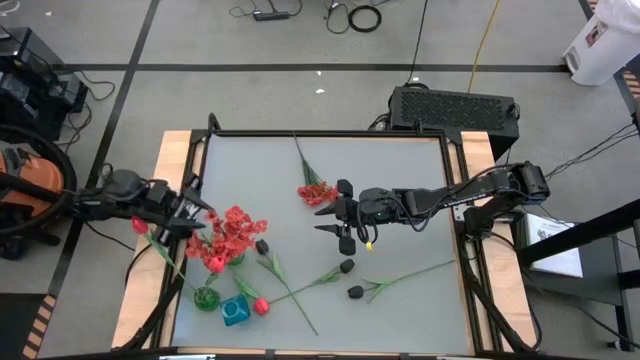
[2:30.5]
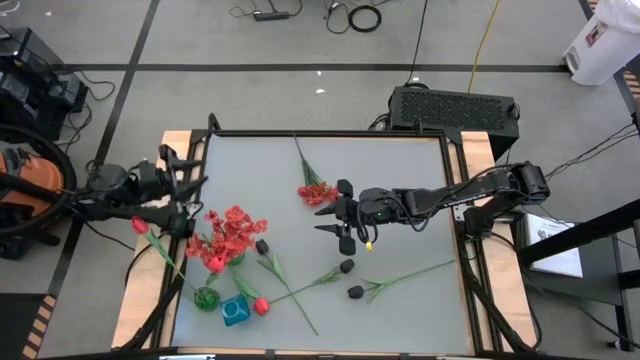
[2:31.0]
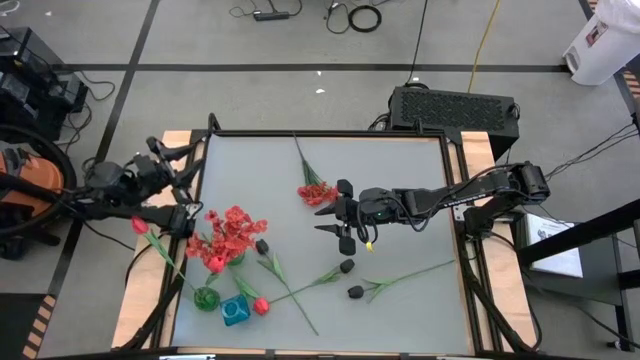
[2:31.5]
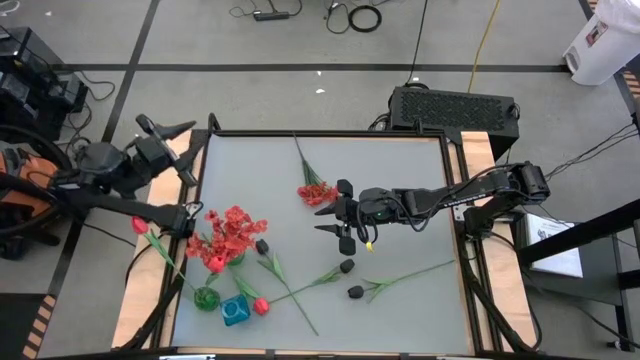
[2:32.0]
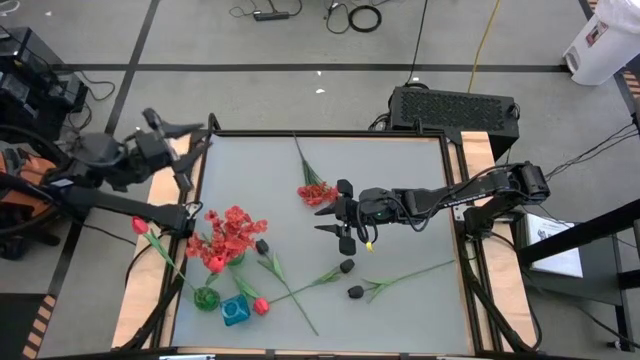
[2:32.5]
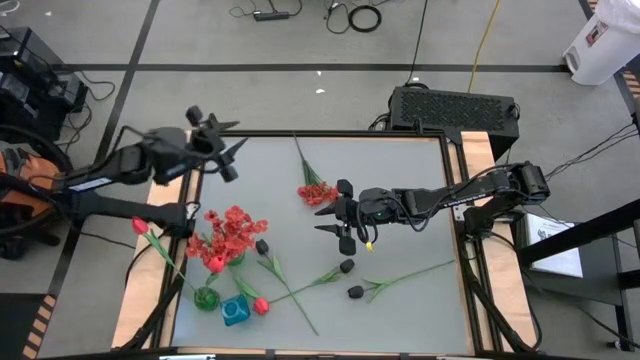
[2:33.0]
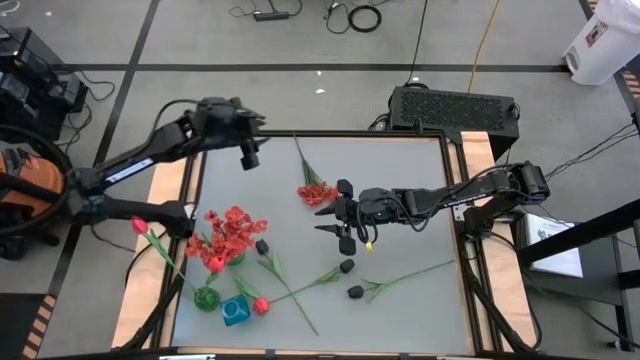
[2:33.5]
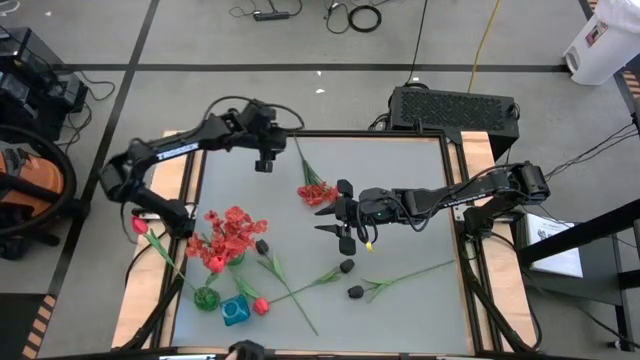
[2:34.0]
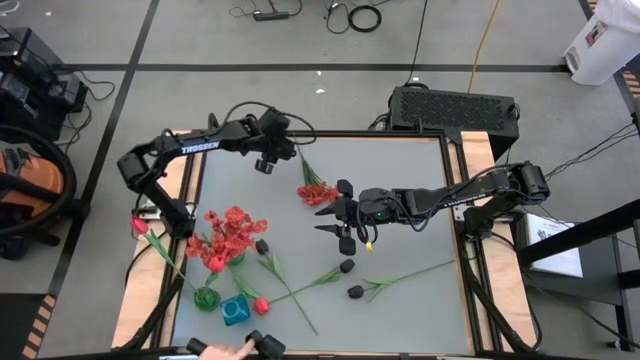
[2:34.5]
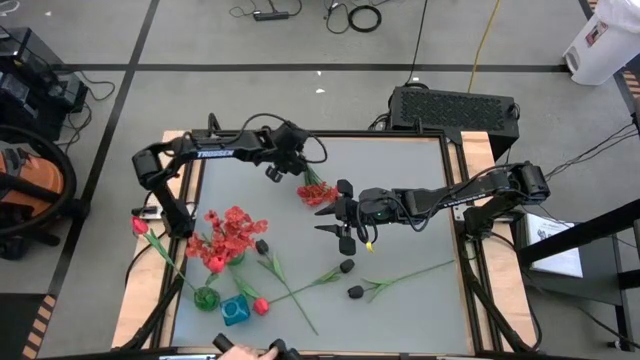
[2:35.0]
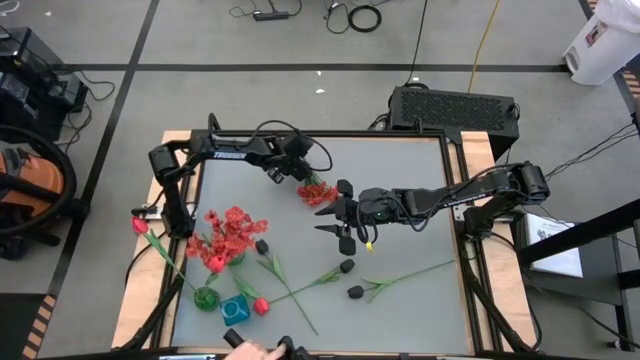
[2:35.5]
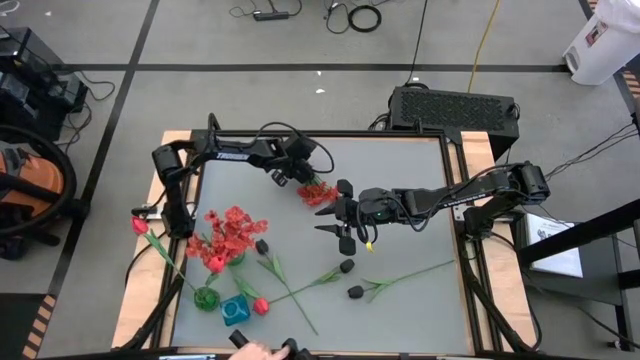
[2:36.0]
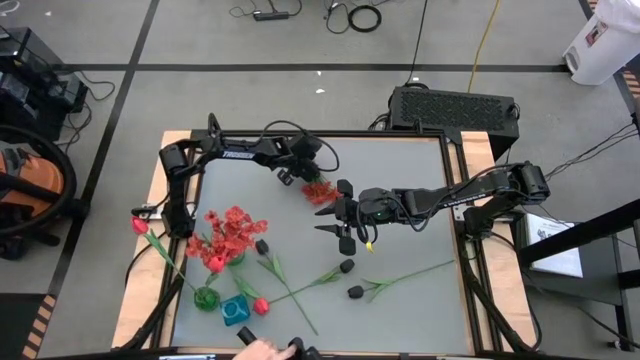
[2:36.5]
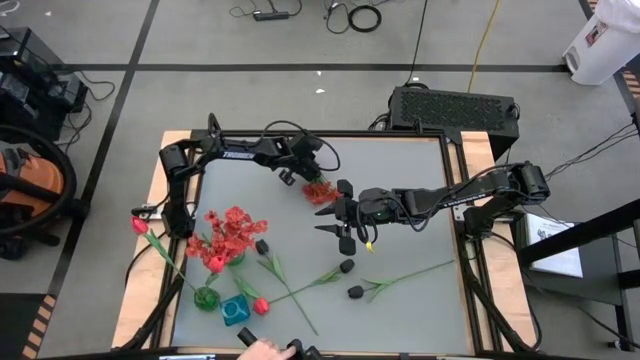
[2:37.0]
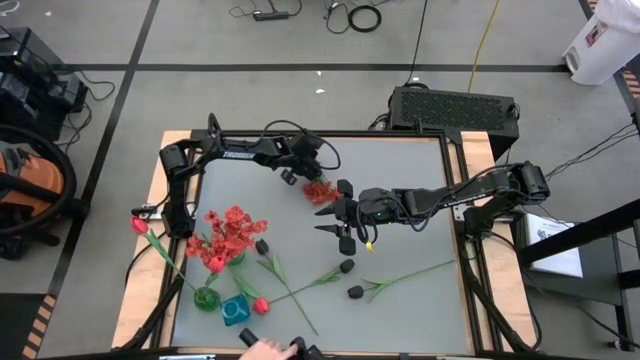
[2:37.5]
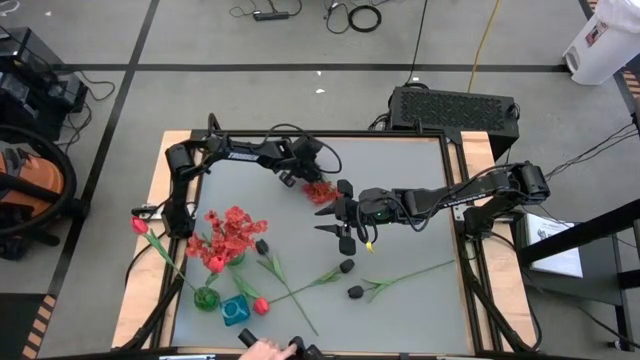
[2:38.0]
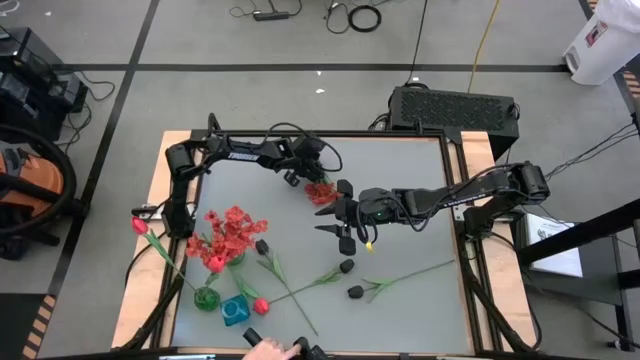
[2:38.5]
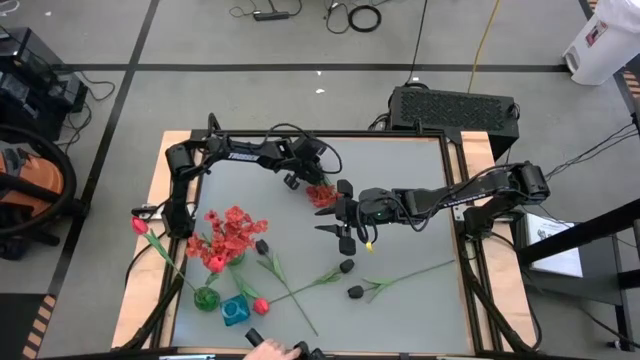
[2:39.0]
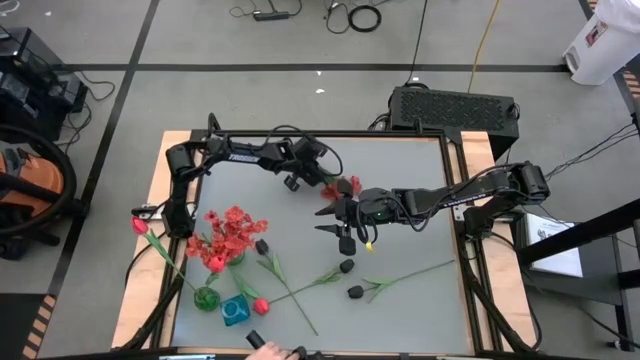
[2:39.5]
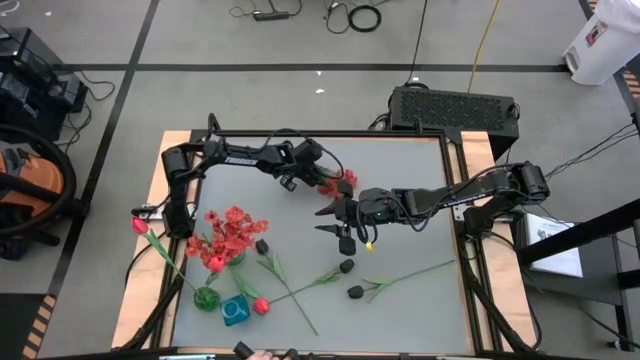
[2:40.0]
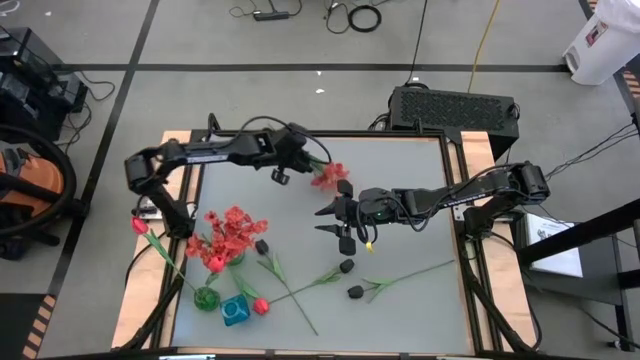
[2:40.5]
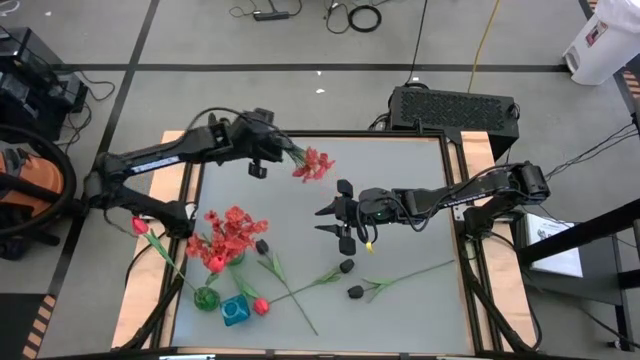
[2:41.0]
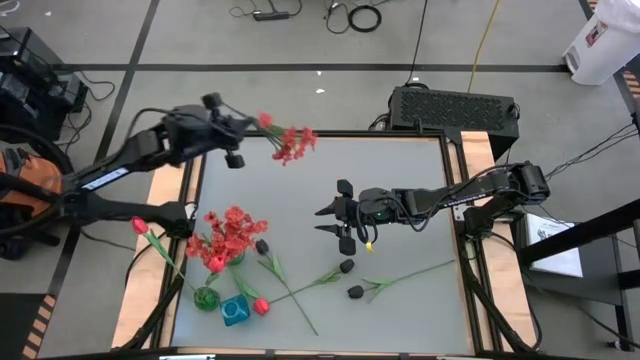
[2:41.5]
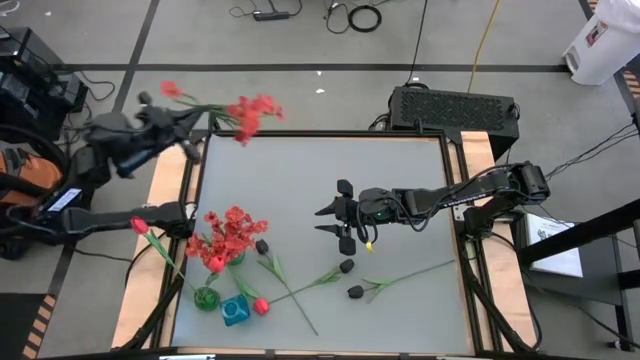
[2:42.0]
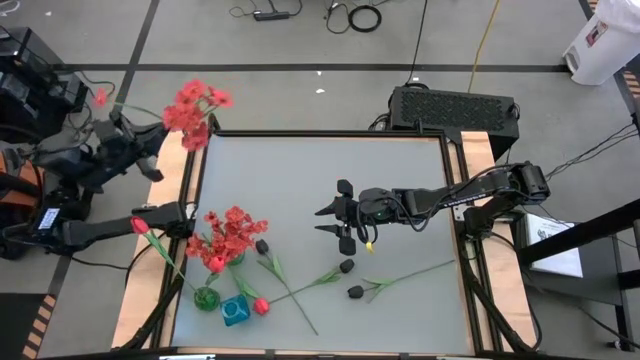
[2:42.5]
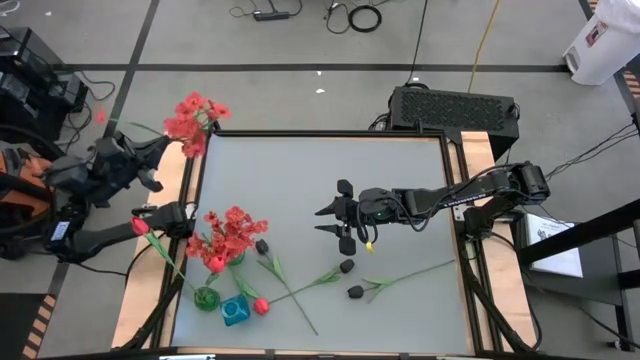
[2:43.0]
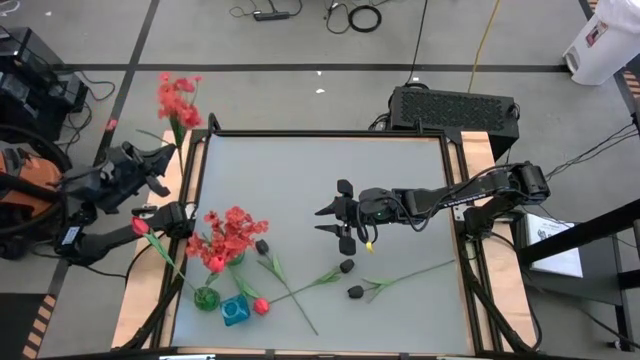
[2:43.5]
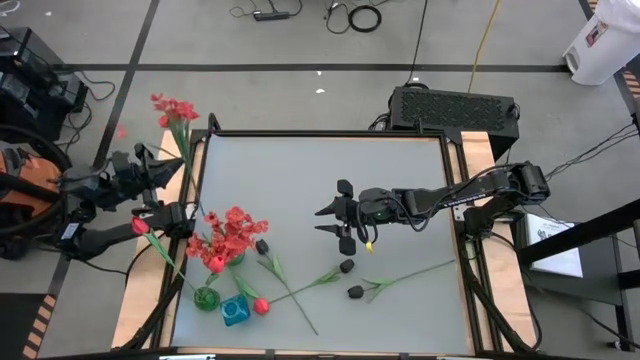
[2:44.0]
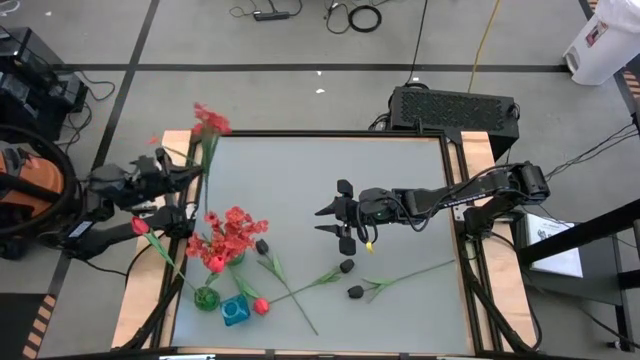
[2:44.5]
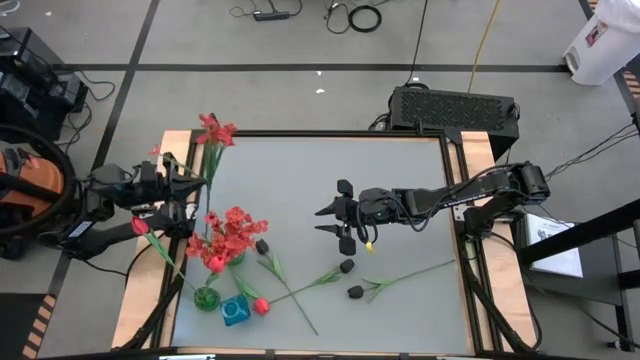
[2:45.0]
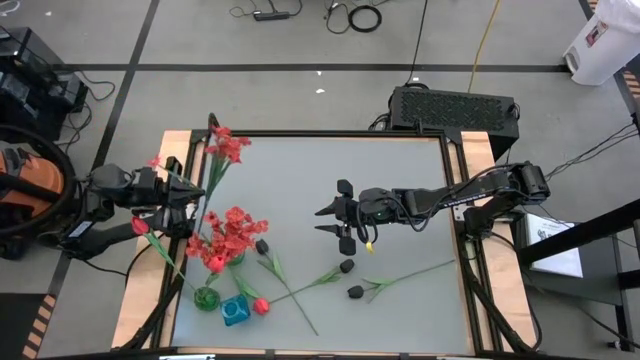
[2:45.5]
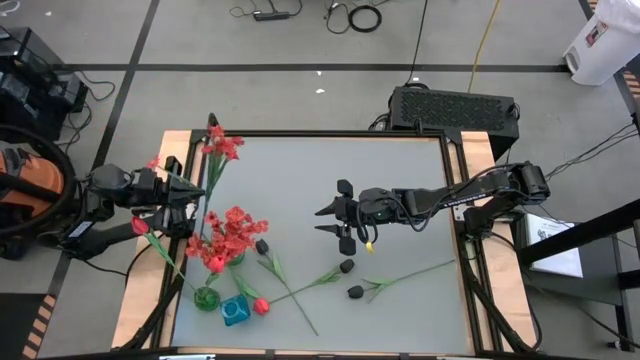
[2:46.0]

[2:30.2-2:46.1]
Task: Sort flowers into vase by color
Put the orange flowers into the top green vase

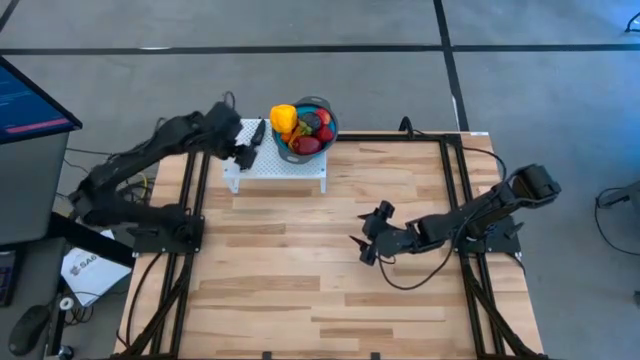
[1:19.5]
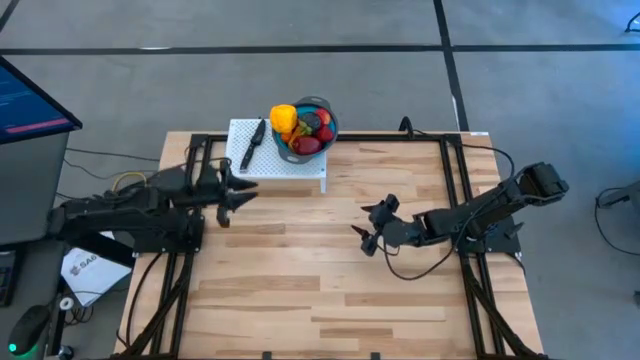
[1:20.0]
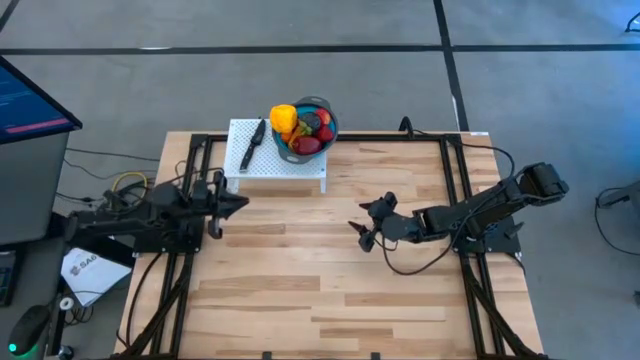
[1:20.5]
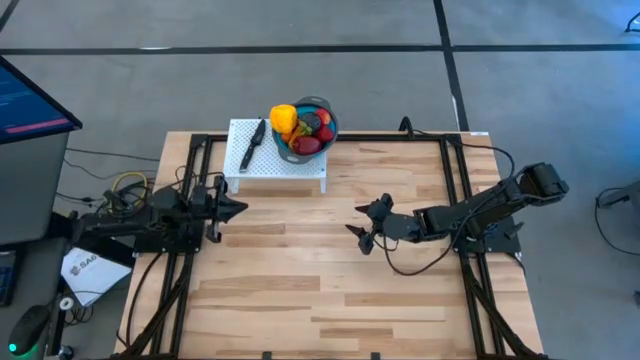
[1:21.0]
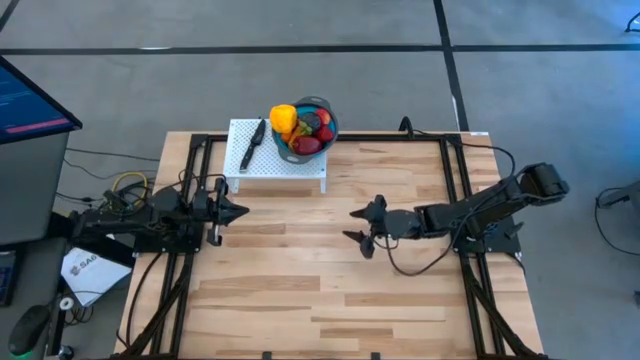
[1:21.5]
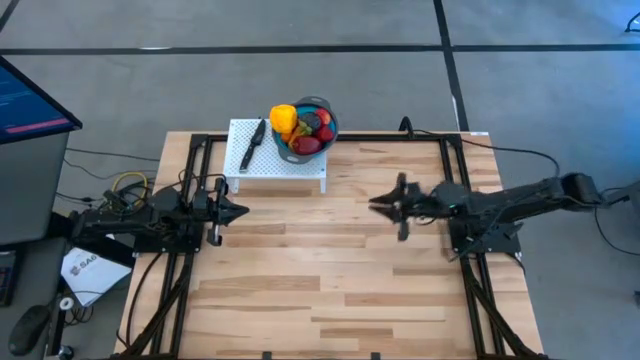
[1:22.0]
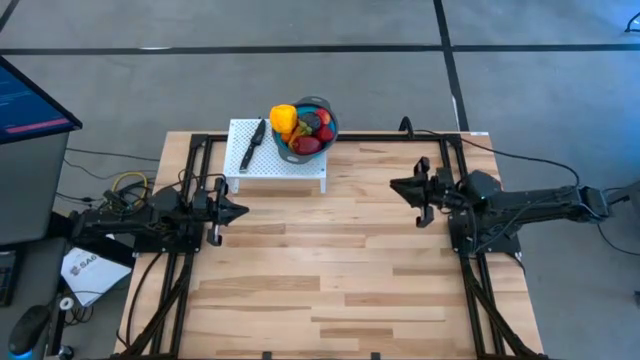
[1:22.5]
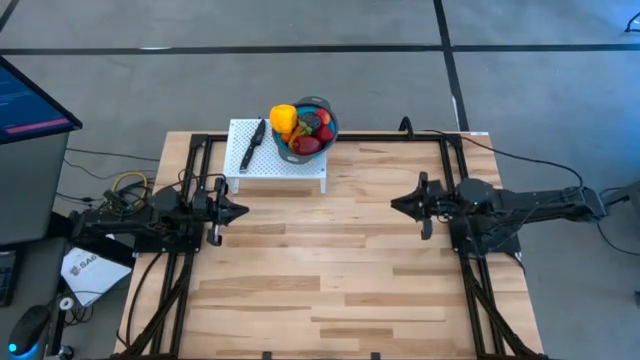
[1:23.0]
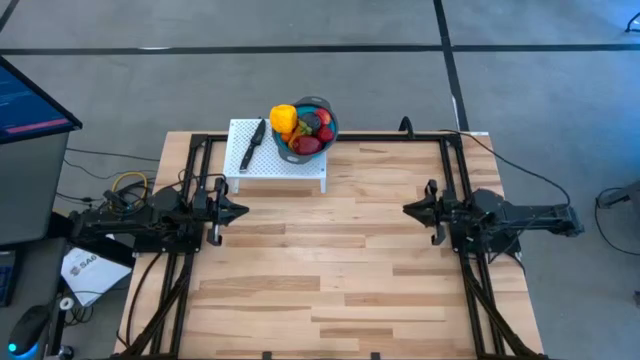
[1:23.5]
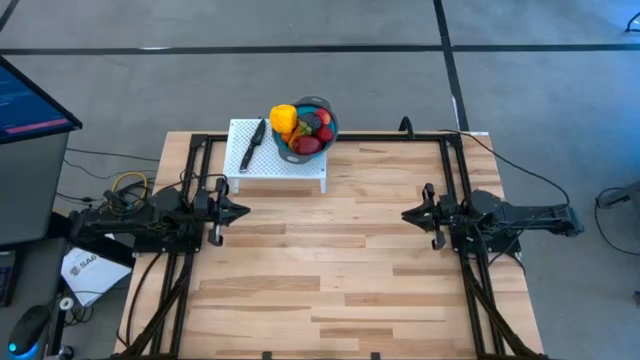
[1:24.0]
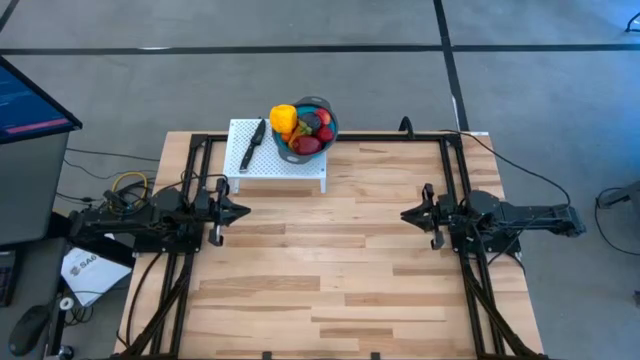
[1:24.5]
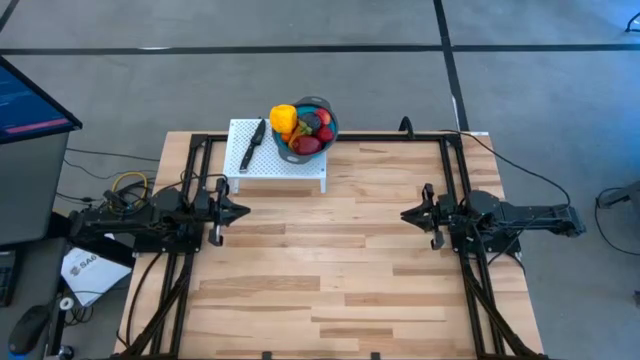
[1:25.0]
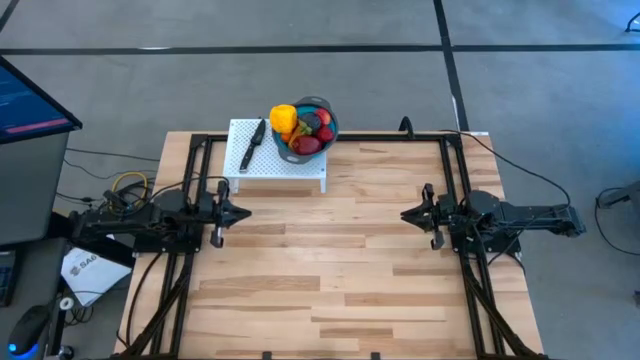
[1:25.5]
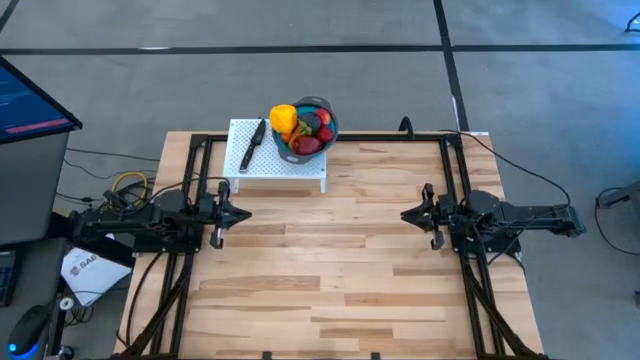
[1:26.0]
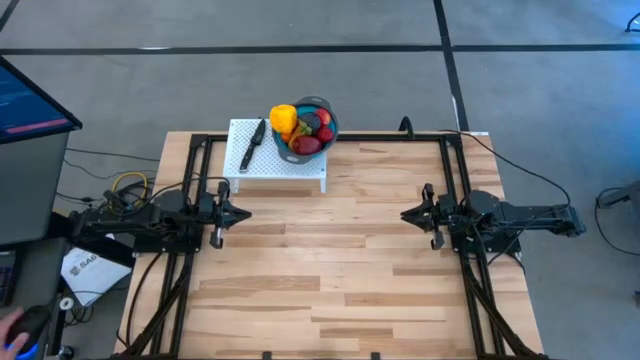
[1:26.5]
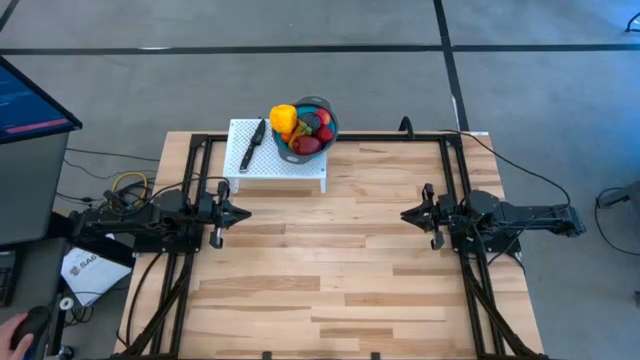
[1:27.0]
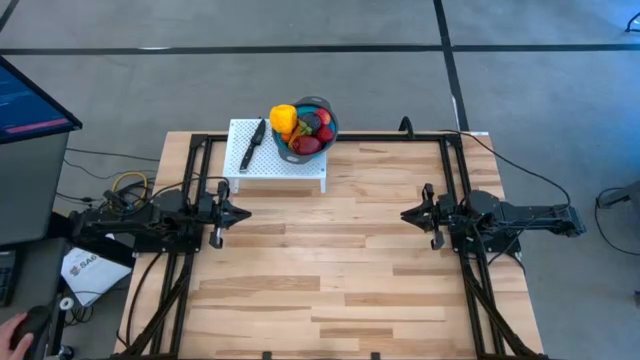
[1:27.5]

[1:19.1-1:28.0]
Task: Pick & Place Fruit
Return to Home Position
